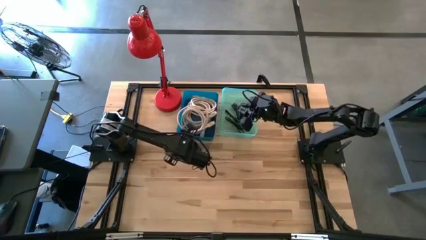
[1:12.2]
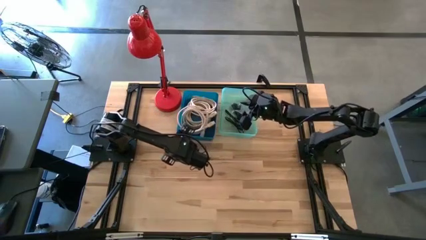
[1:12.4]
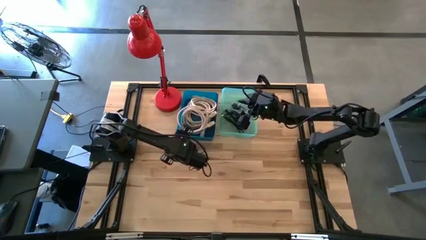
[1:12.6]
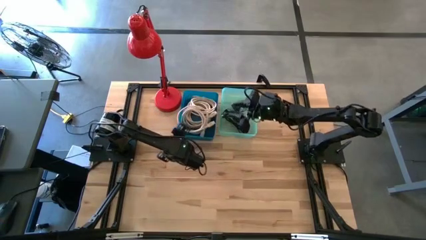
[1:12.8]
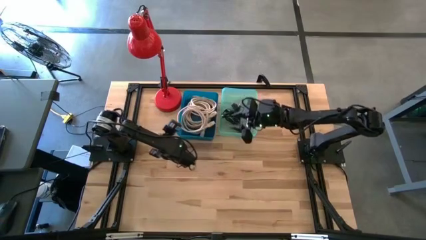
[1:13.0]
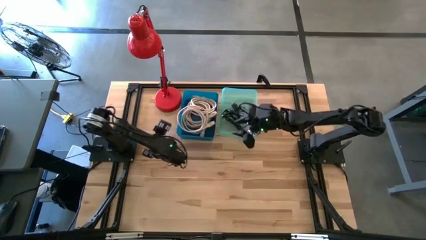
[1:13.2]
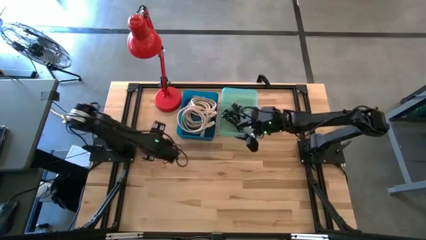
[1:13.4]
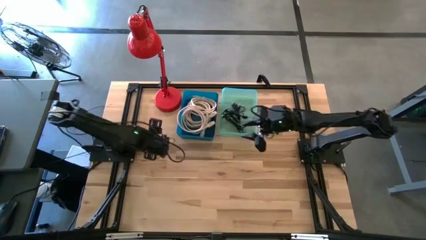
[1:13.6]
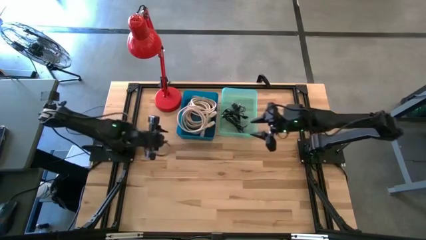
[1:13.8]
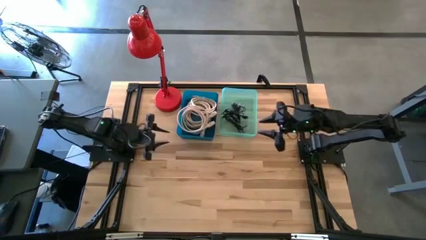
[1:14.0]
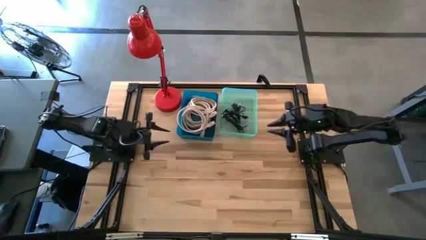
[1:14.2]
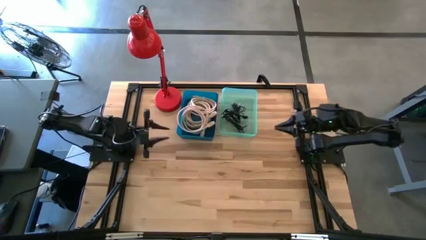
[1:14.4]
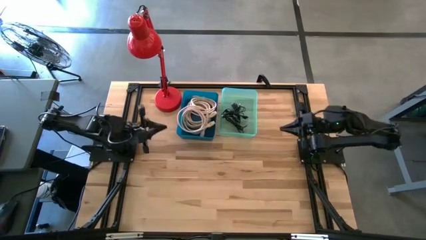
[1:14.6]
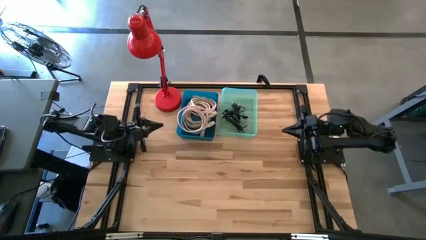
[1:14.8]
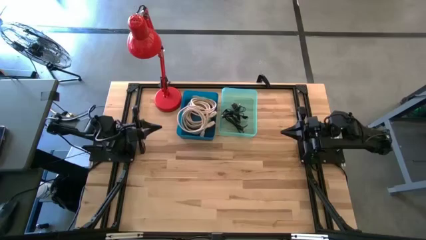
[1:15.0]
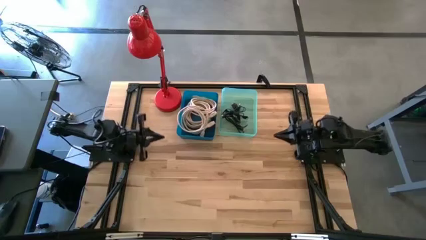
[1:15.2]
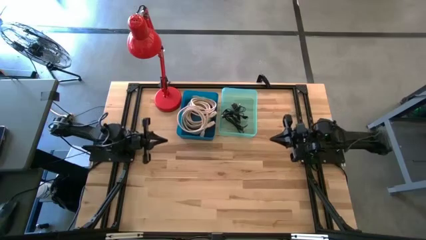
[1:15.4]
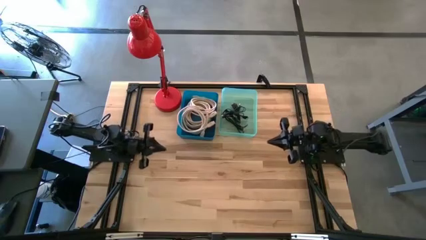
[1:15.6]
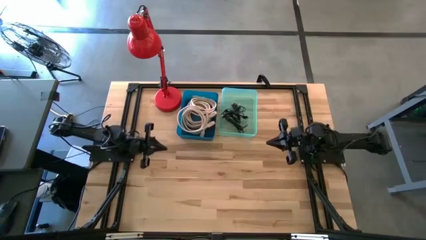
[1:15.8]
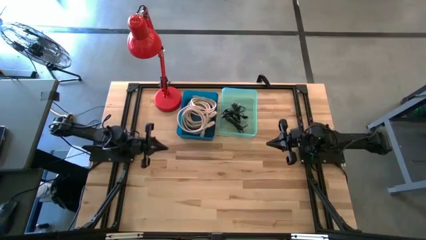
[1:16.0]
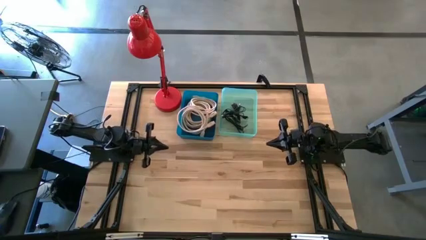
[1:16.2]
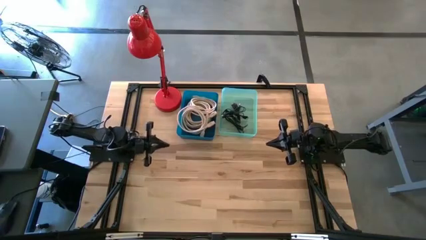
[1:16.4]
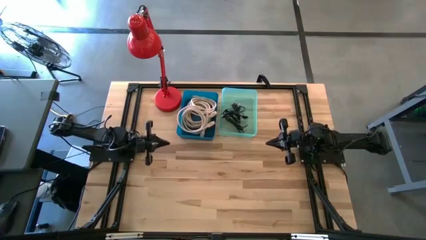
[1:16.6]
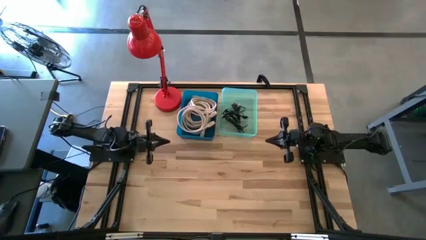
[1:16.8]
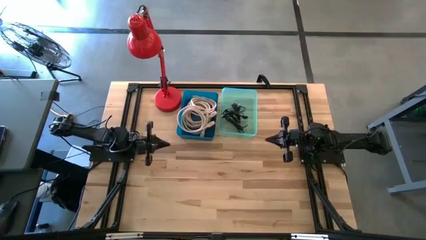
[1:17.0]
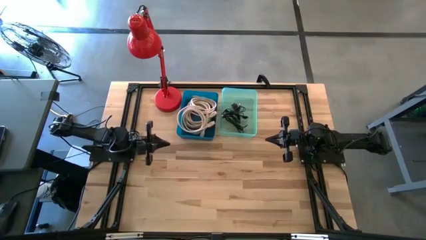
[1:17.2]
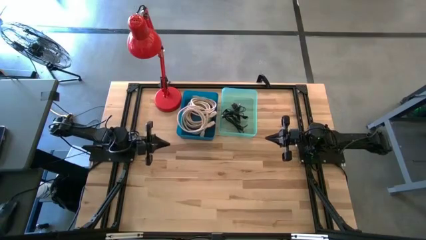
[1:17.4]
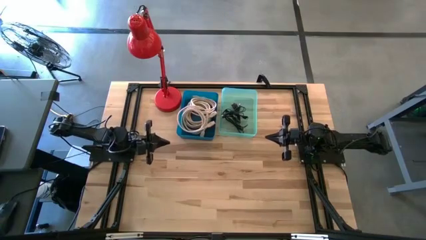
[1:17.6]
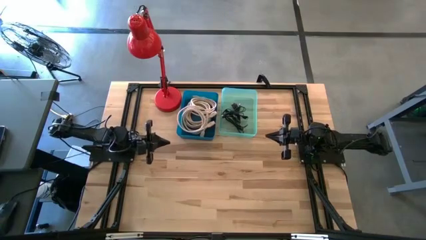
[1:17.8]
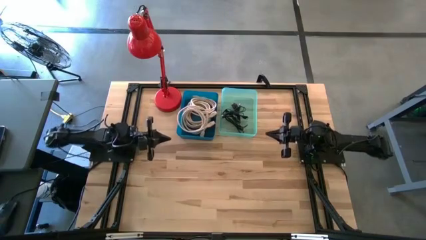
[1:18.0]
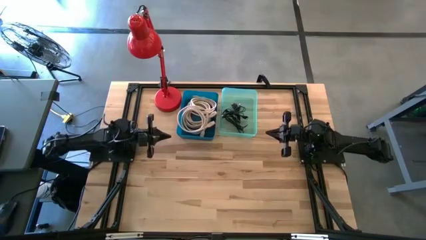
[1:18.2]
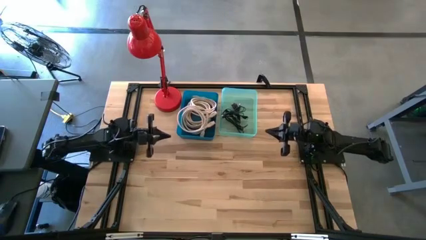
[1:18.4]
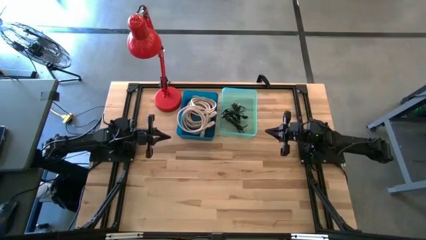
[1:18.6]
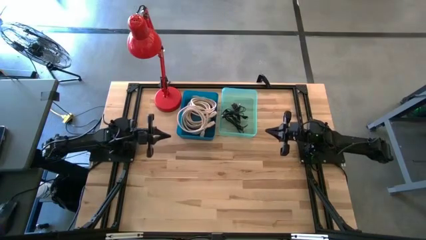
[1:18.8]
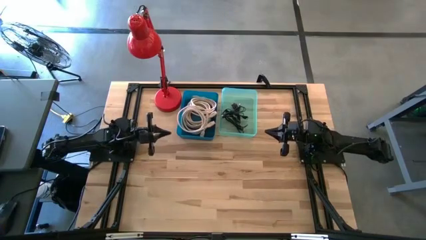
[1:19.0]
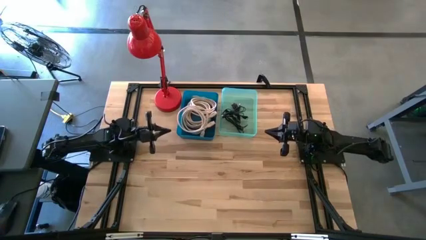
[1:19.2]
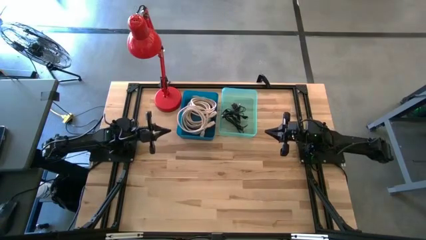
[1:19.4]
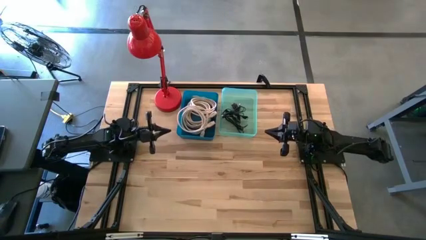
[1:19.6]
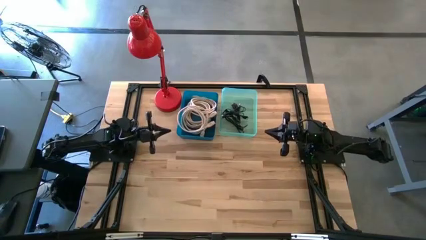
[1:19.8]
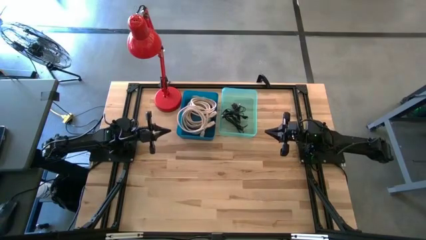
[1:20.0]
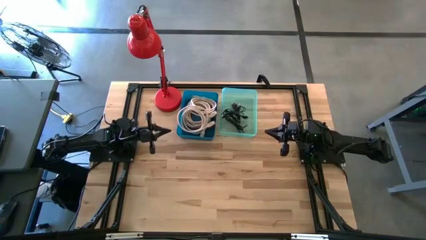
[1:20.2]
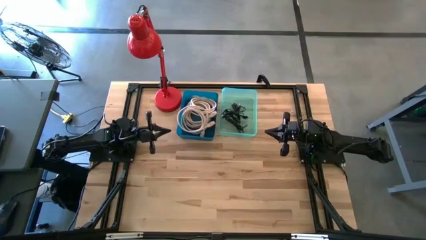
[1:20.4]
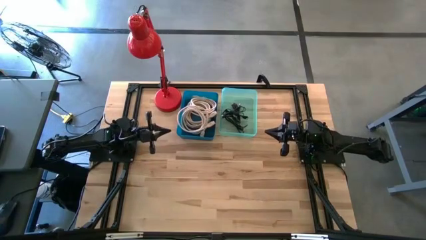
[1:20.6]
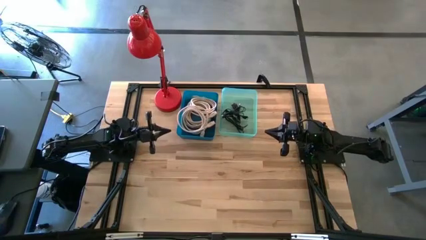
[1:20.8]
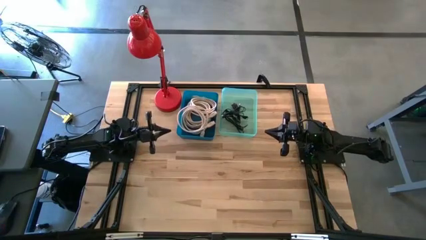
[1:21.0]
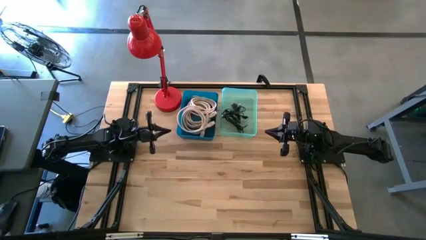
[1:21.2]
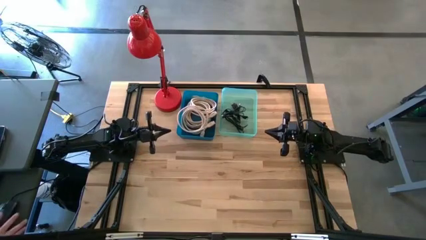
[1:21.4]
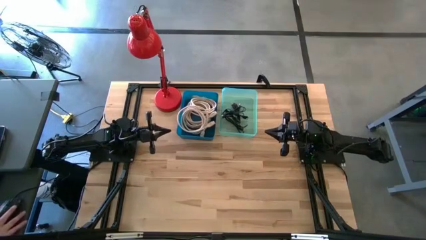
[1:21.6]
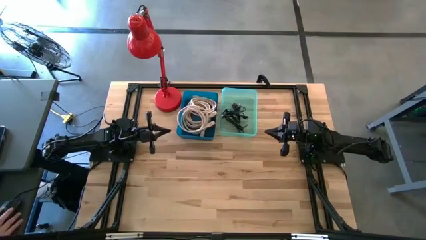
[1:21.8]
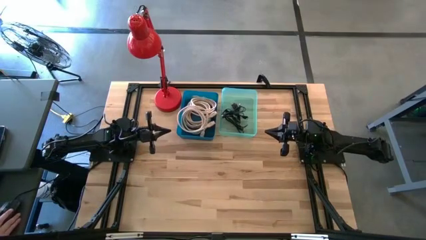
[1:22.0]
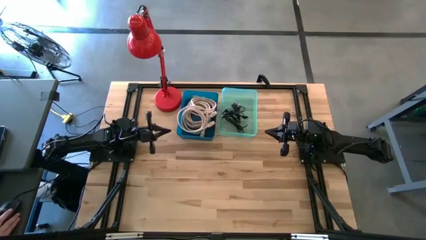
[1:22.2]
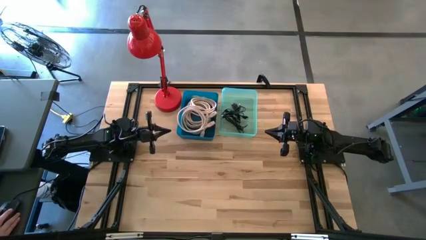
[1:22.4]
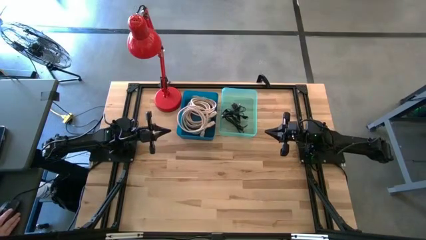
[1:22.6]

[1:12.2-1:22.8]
Task: Pick & Place USB Port
Return to Home Position
